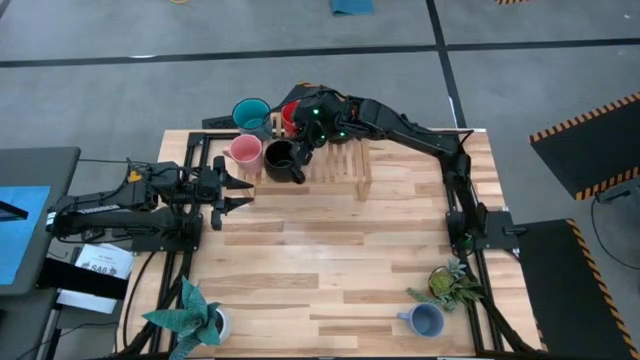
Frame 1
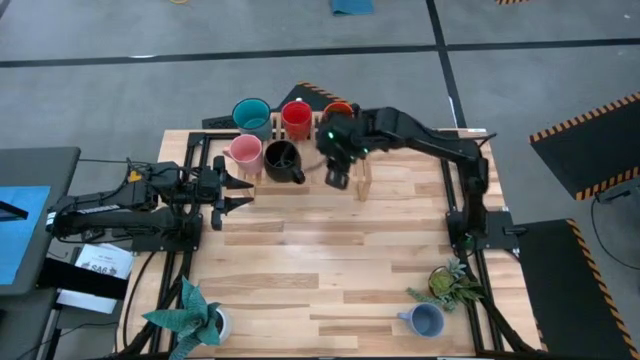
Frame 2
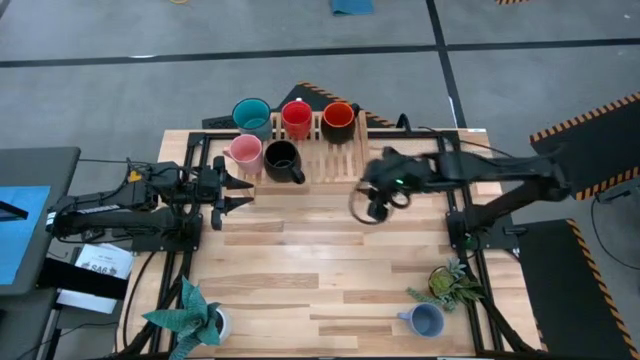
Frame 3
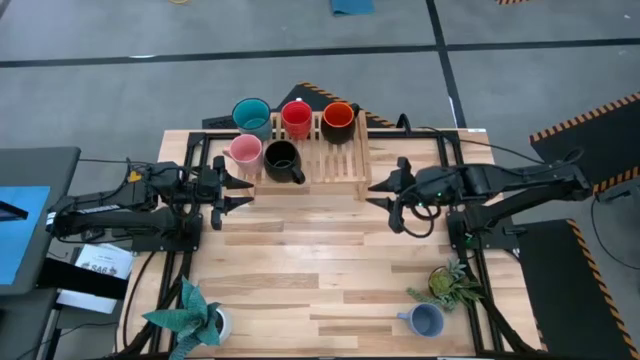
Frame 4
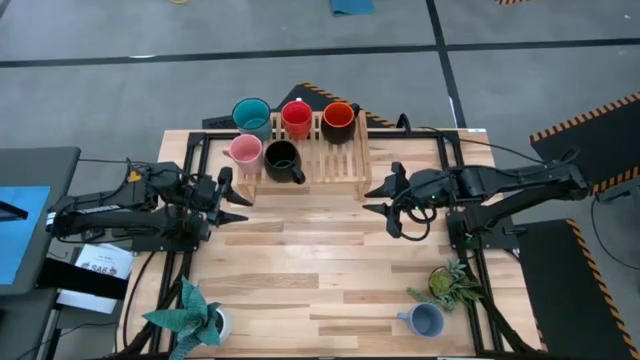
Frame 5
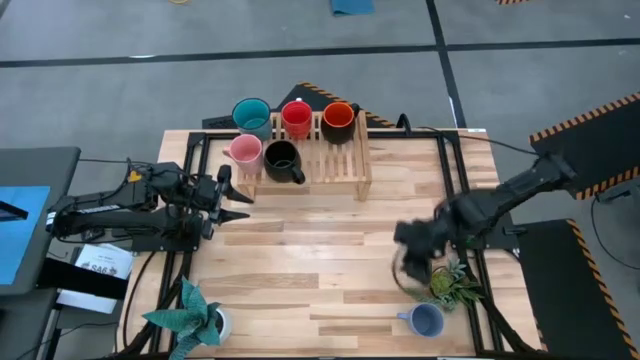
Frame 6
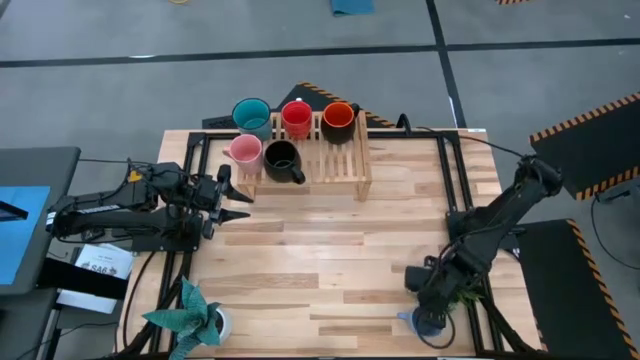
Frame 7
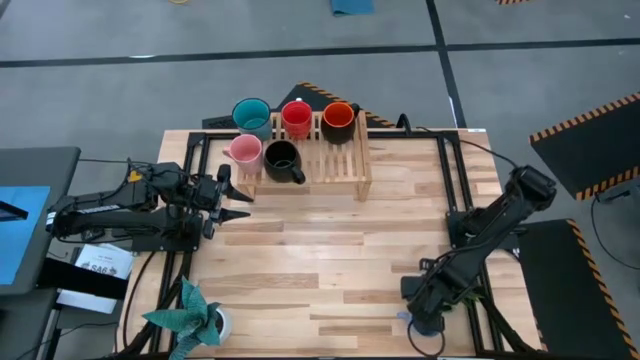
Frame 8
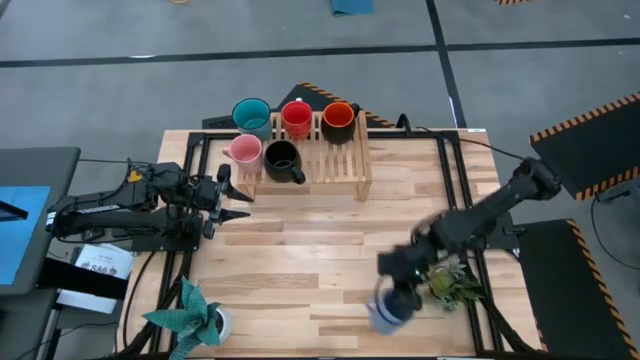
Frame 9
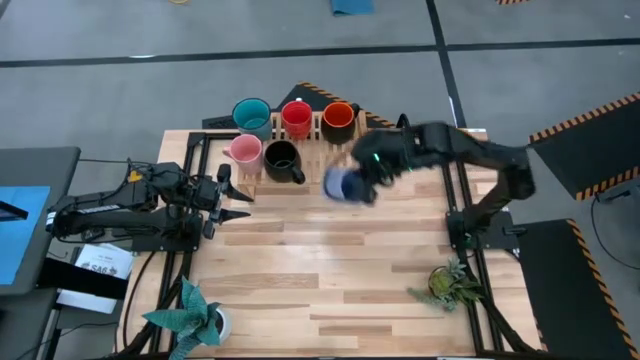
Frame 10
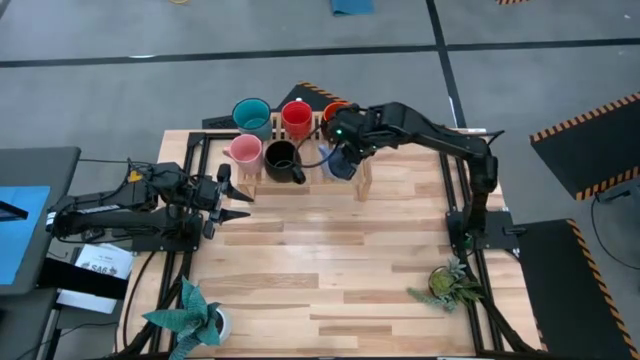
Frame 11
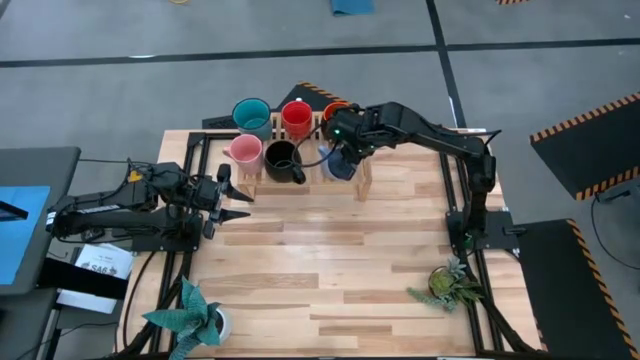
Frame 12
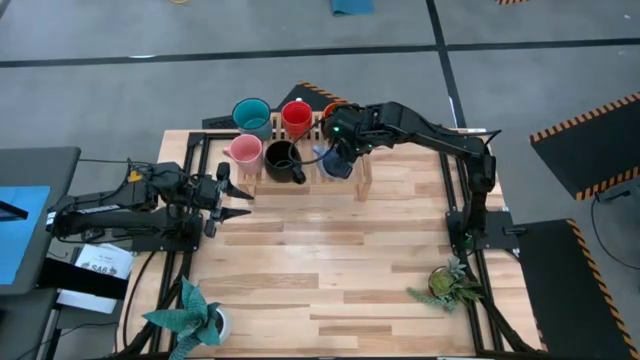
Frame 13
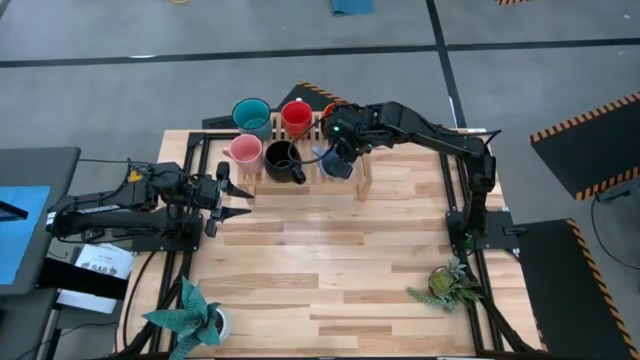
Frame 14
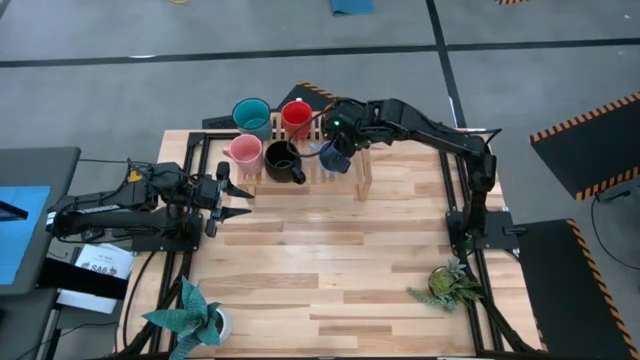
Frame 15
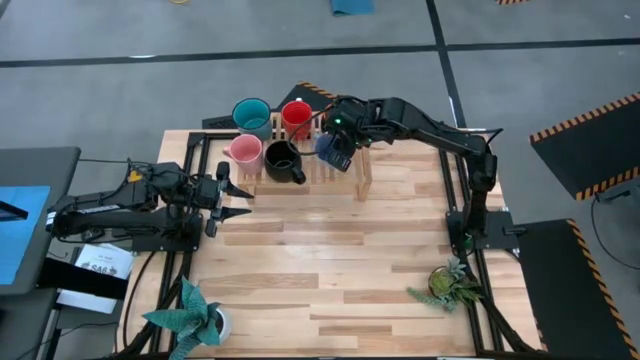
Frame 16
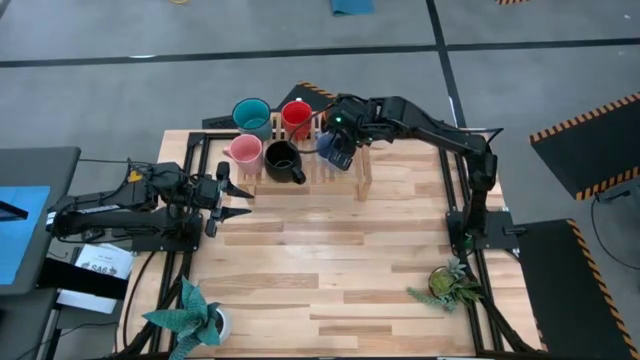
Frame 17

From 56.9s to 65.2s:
Task: Place coffee mugs
Put the light blue cup on the shelf aligned with the other black and orange cup

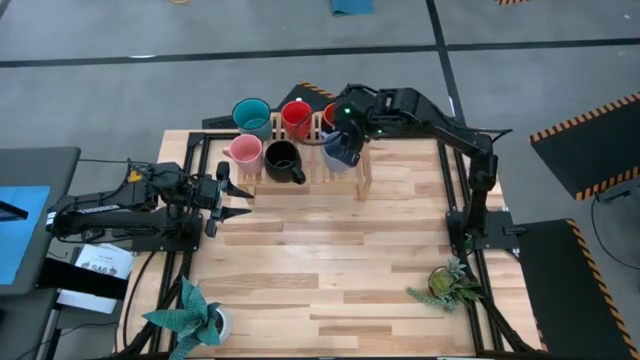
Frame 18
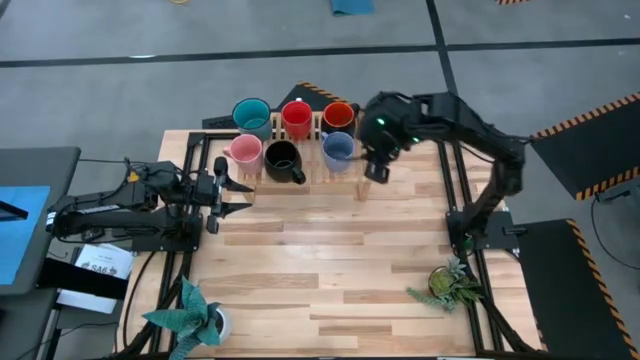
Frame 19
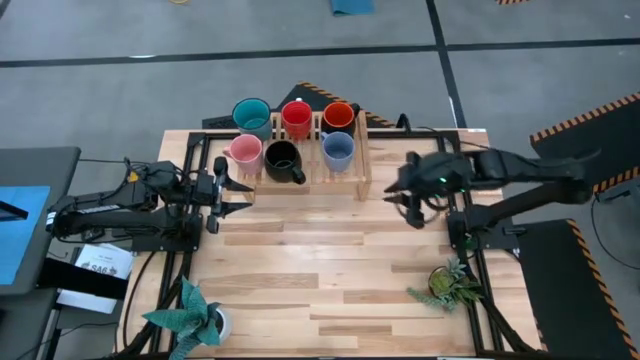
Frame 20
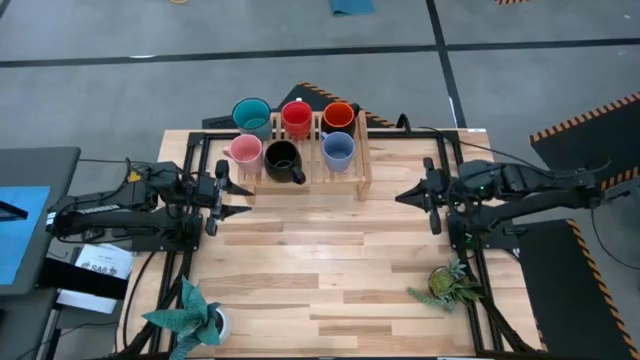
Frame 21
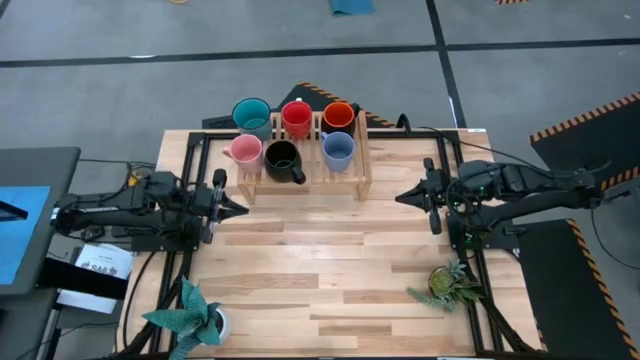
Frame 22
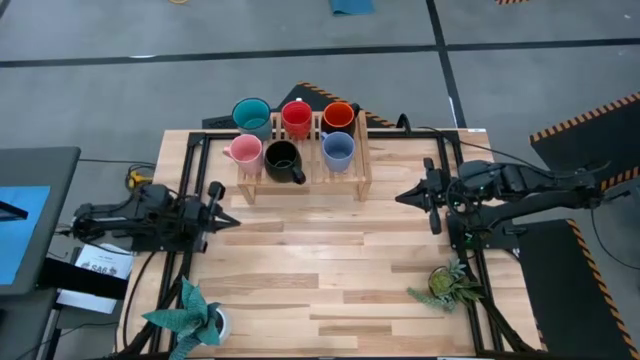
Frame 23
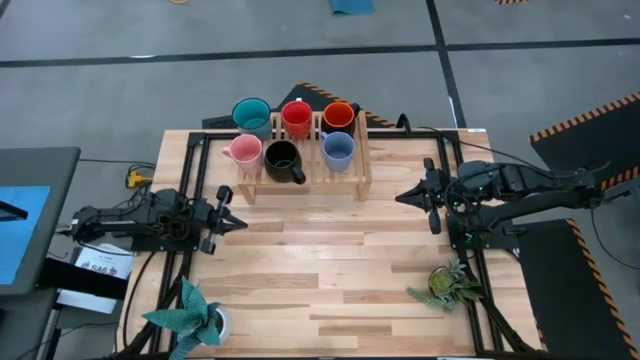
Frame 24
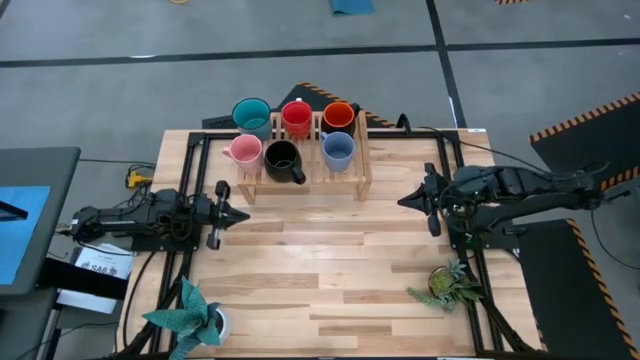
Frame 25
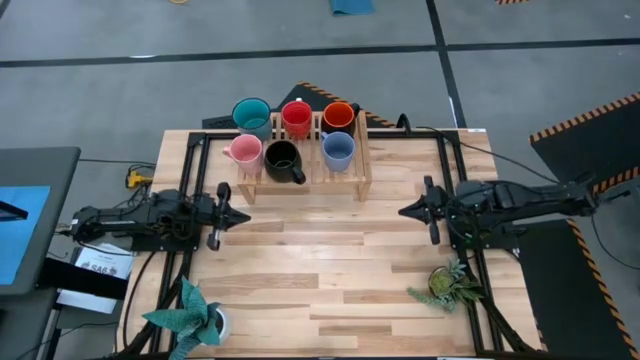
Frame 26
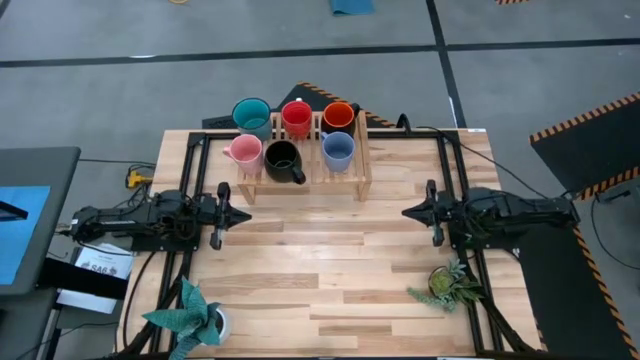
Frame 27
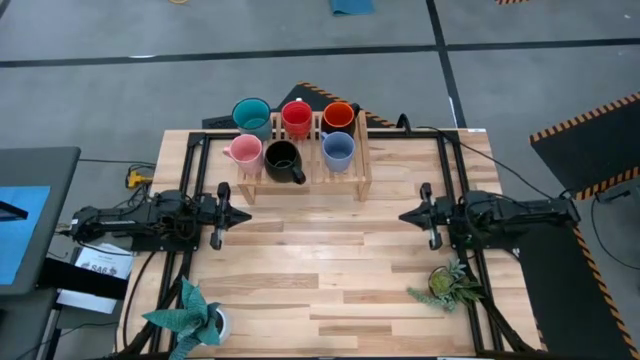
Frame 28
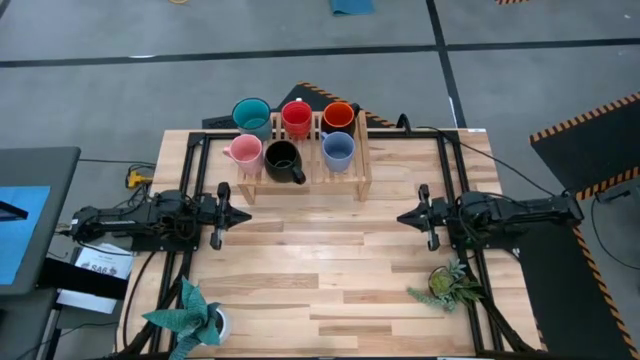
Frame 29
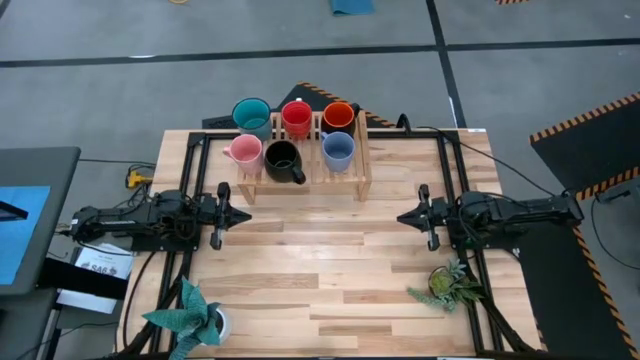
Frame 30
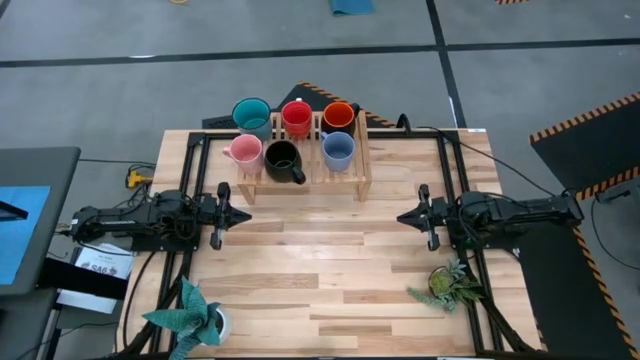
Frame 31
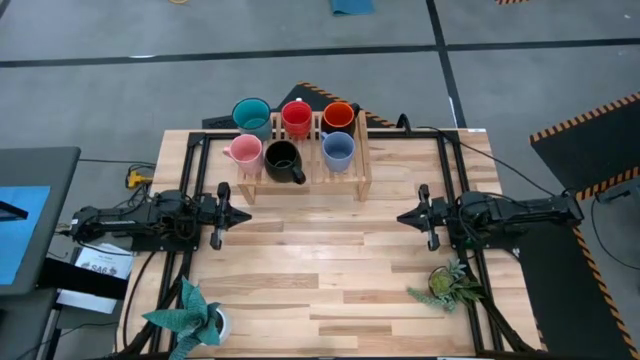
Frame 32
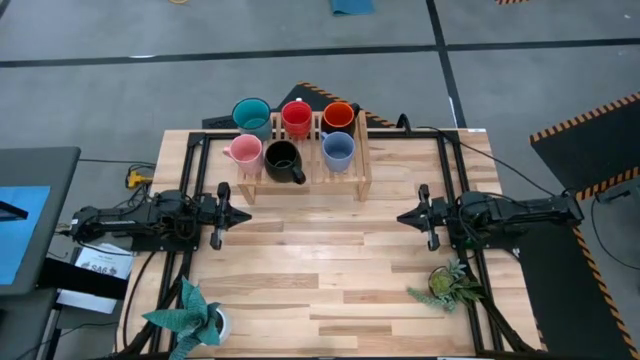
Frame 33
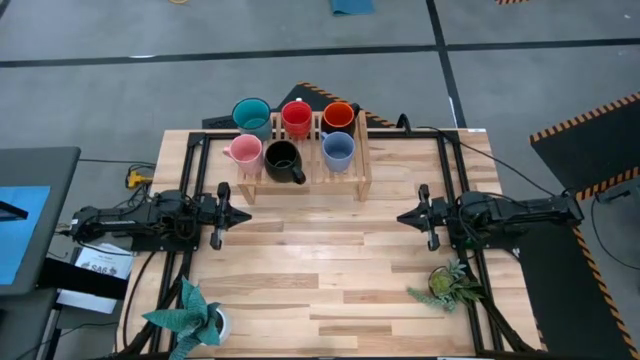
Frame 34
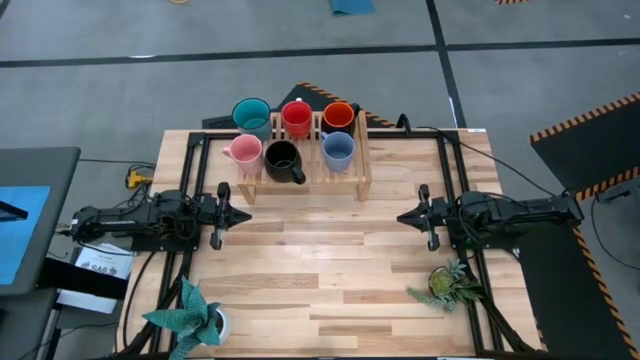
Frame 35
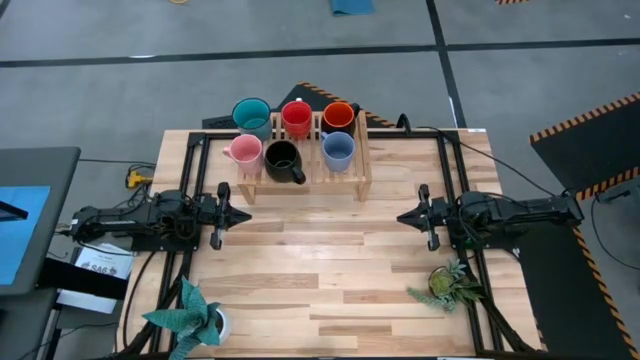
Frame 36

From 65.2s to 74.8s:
Return to Home Position

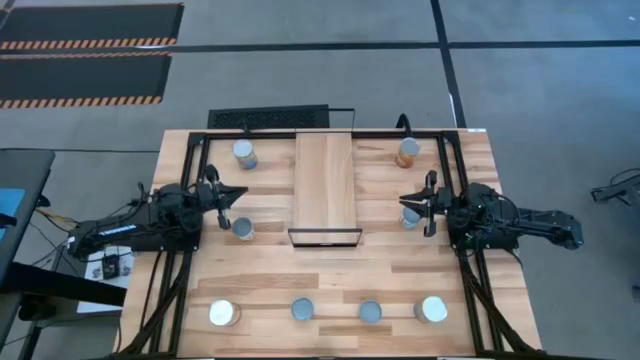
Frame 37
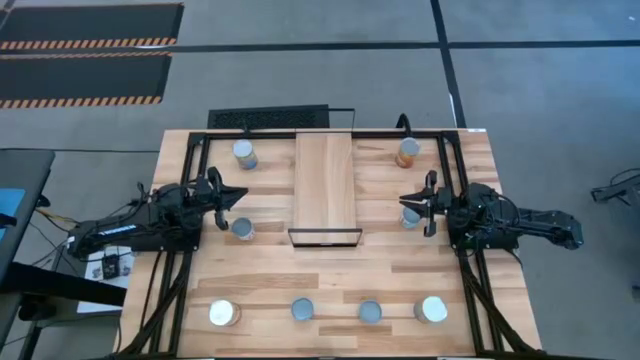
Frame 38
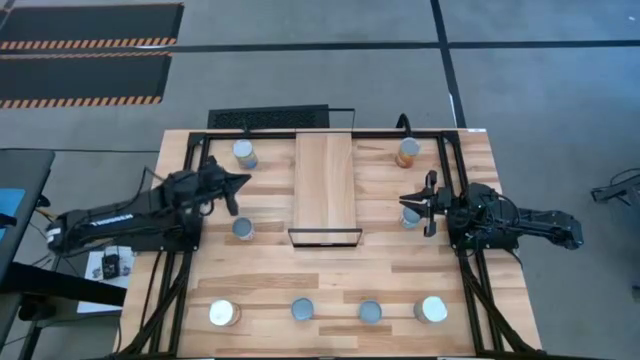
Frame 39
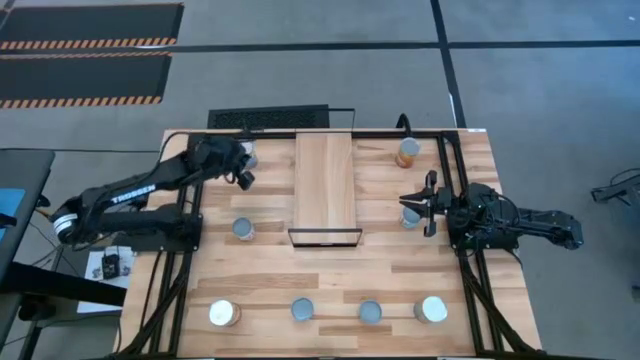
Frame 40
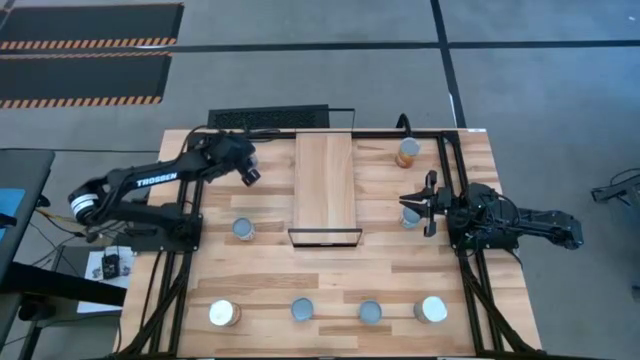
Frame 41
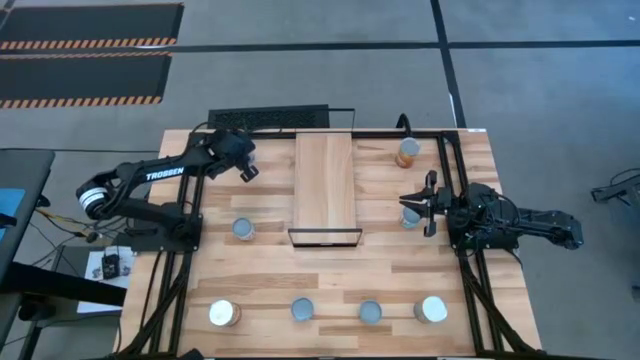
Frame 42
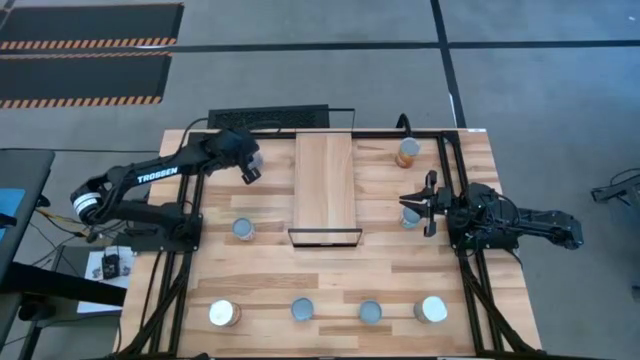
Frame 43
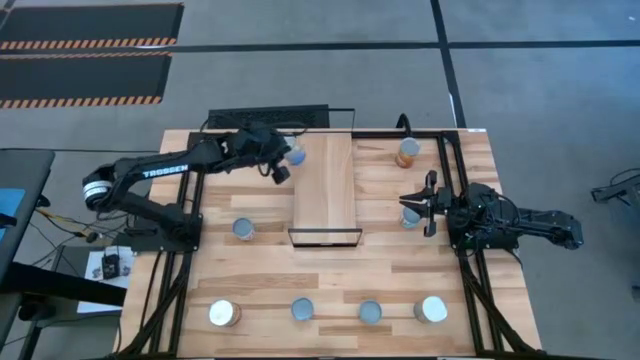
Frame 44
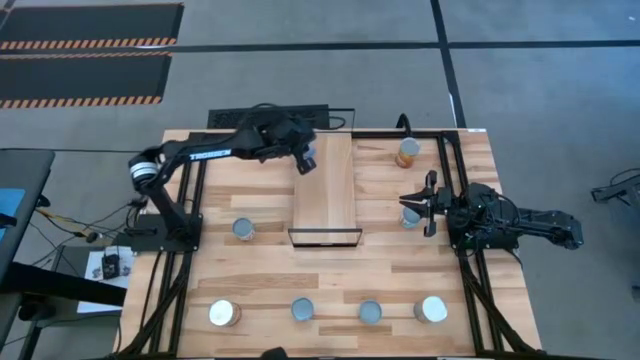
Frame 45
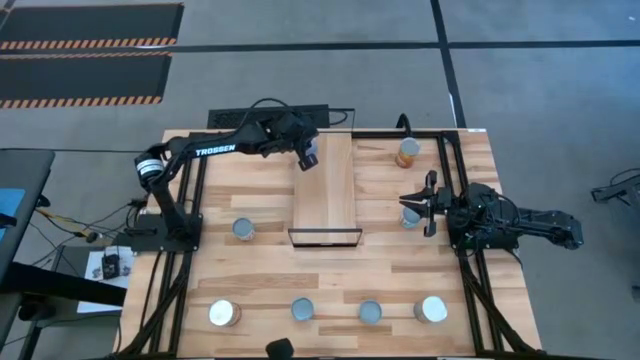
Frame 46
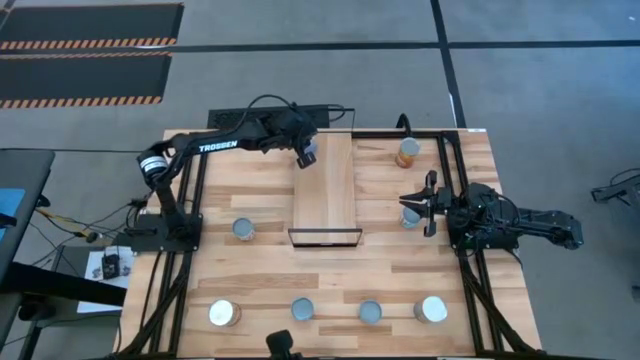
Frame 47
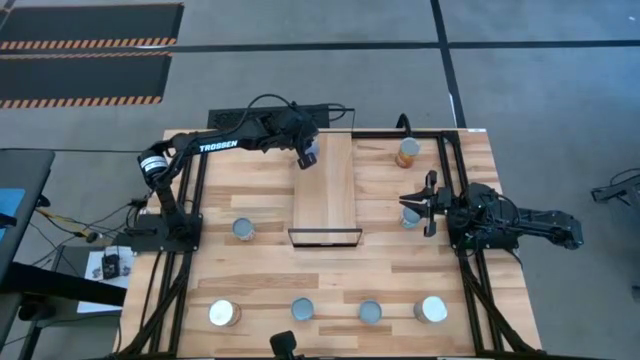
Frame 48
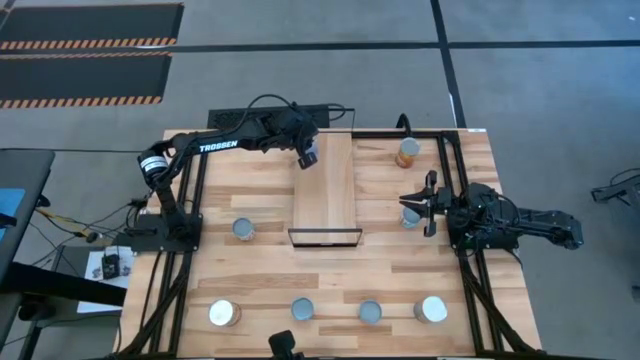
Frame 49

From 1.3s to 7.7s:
Task: Pick and place cans onto a shelf
Put the top canned peaches on the shelf
